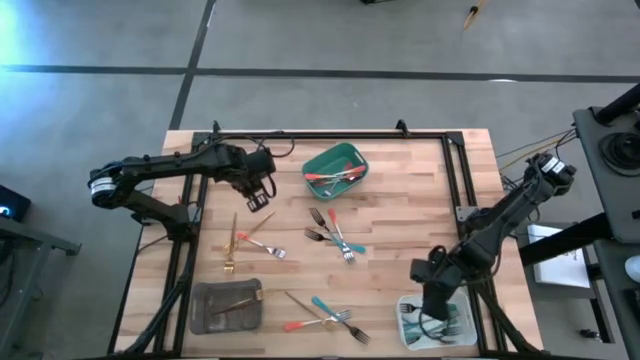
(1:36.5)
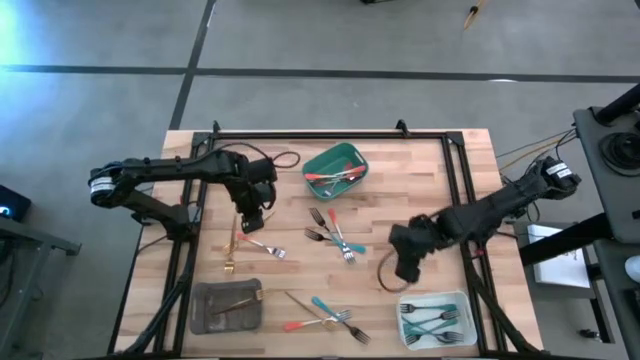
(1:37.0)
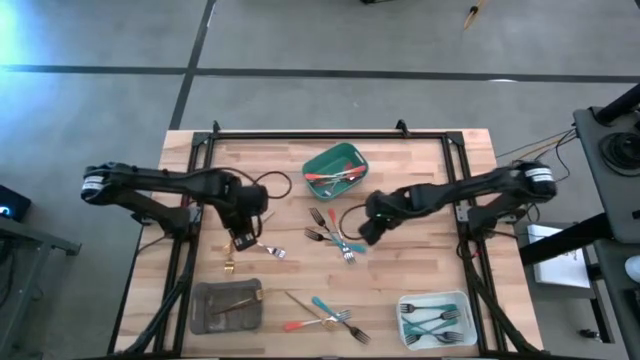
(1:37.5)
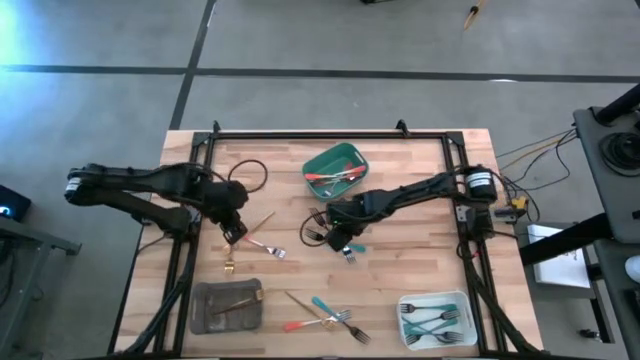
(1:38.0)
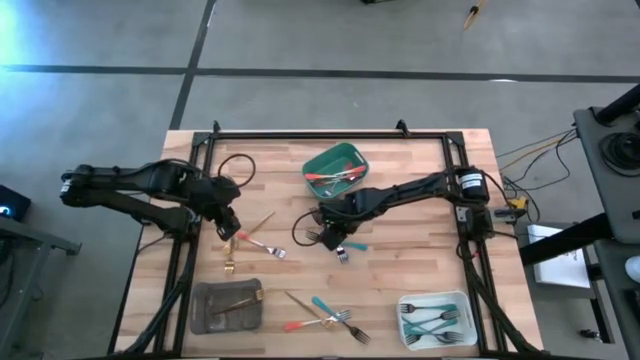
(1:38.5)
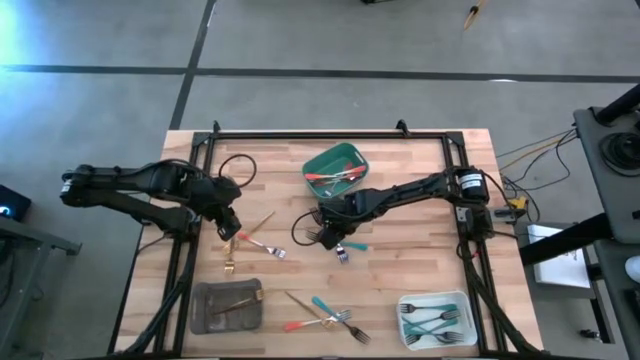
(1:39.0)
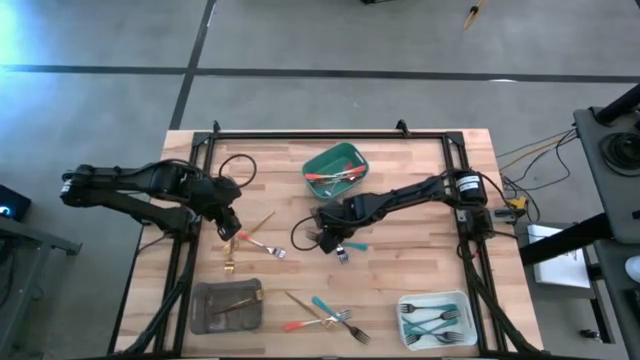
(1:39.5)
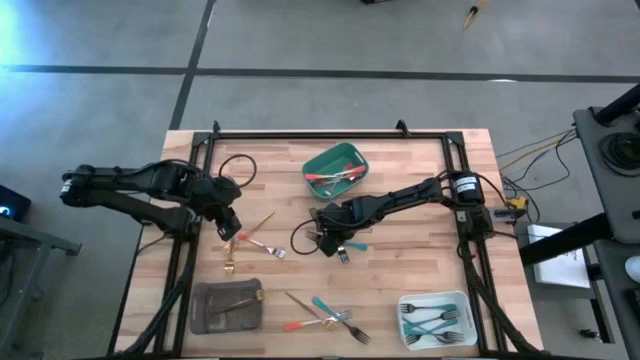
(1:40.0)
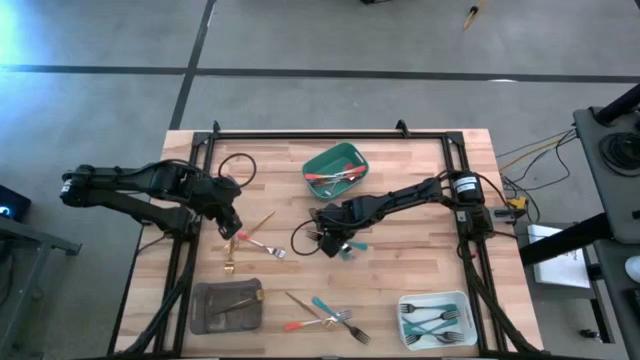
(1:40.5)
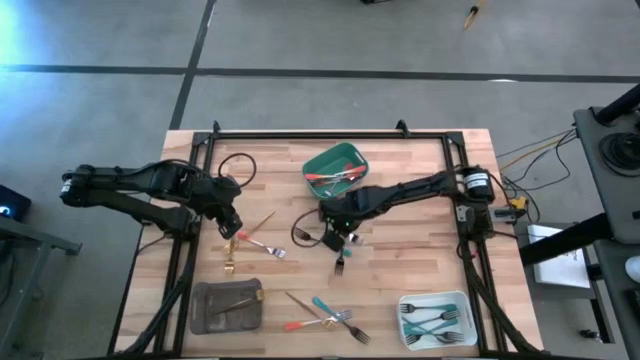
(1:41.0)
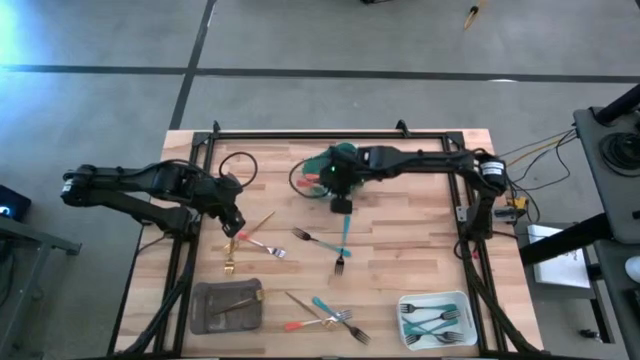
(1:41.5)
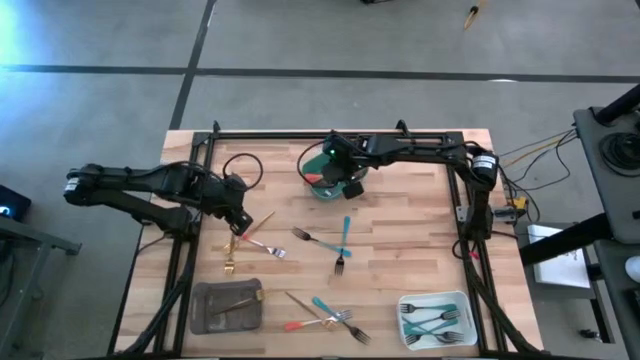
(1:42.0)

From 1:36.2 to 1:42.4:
Task: Sort silverware by color (type)
Put the orange fork into the green bin

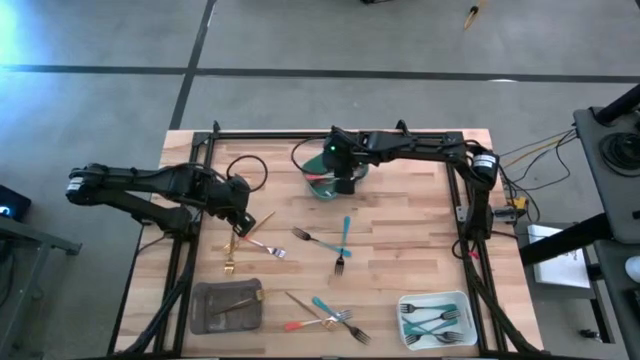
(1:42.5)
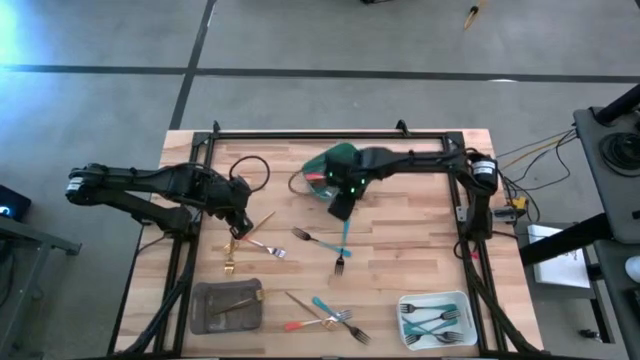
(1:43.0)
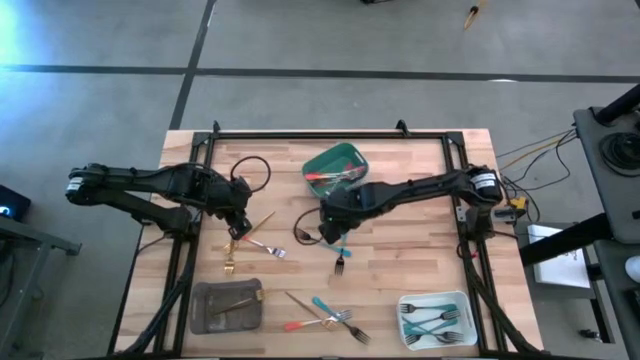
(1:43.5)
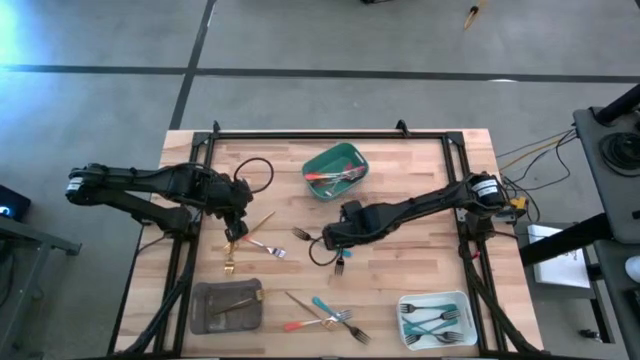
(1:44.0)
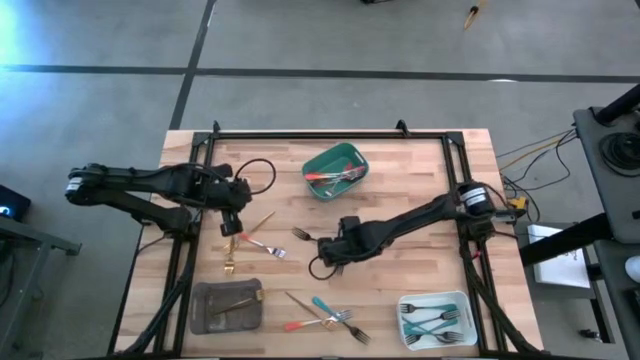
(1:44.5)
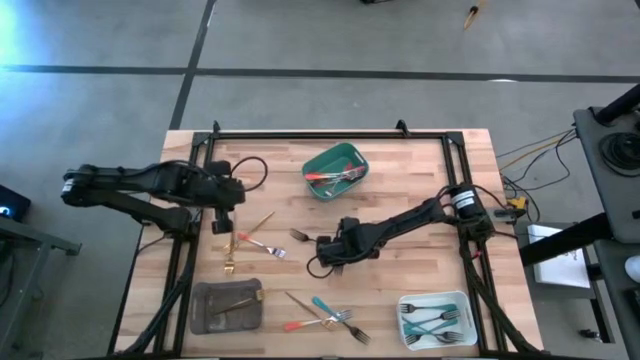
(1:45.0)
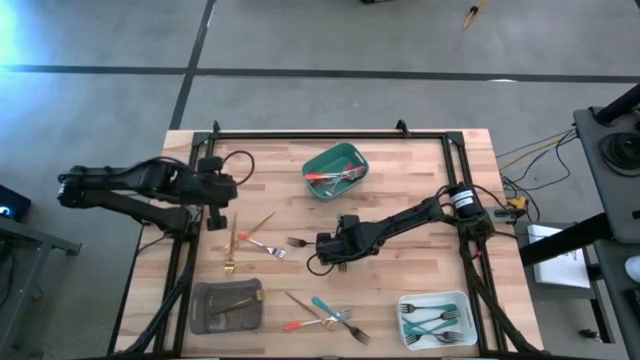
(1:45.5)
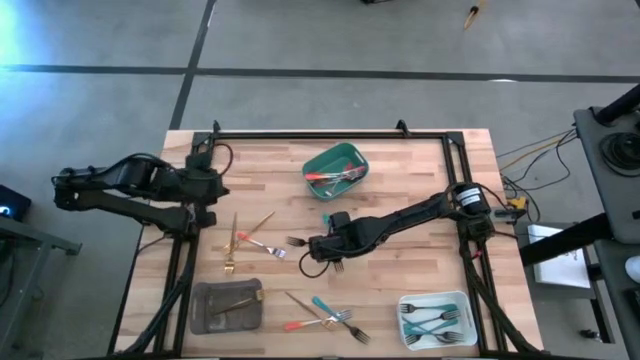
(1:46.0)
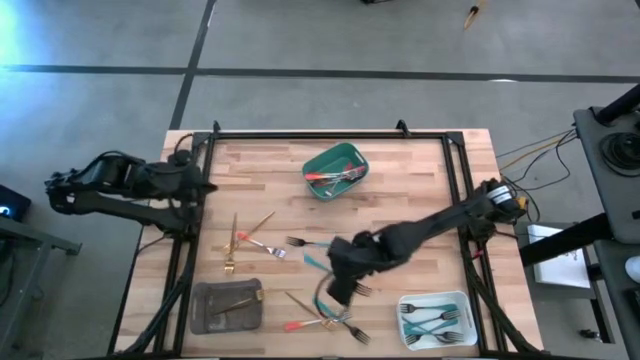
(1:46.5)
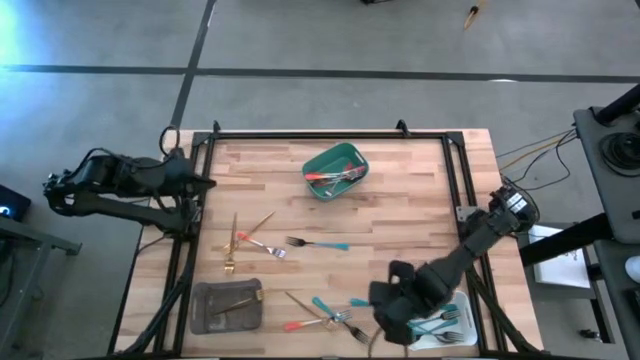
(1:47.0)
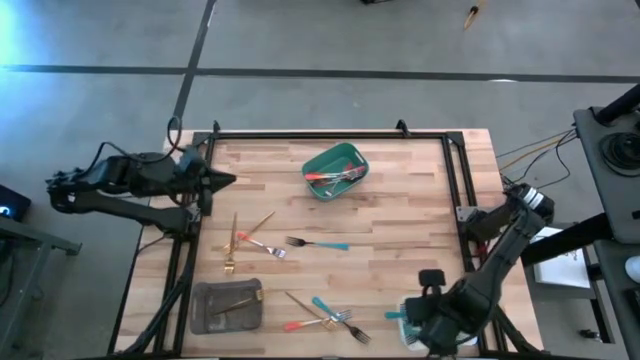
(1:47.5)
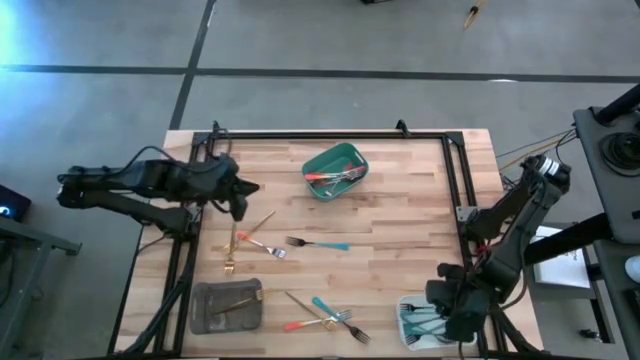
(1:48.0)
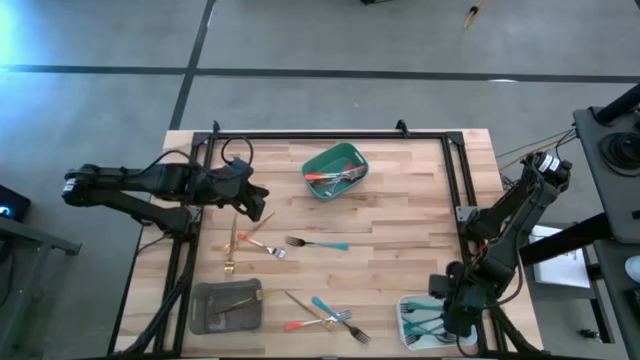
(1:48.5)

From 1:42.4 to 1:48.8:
Put the blue fork into the white bin

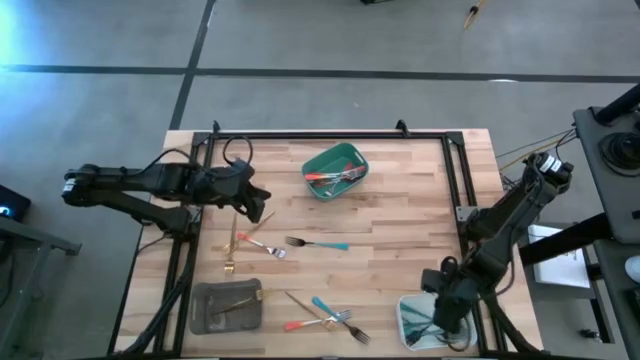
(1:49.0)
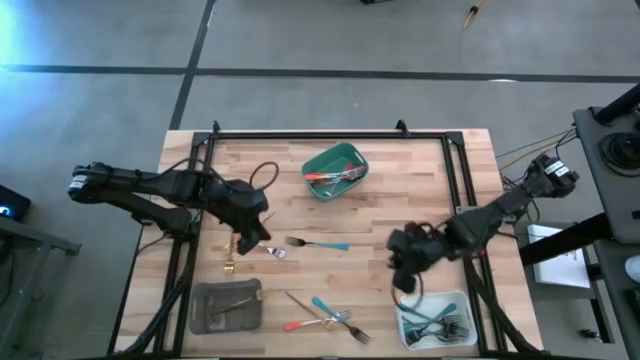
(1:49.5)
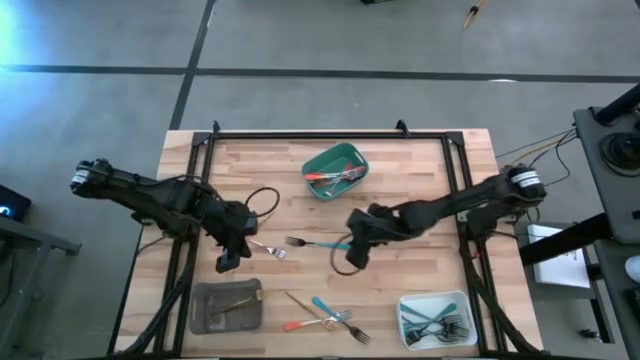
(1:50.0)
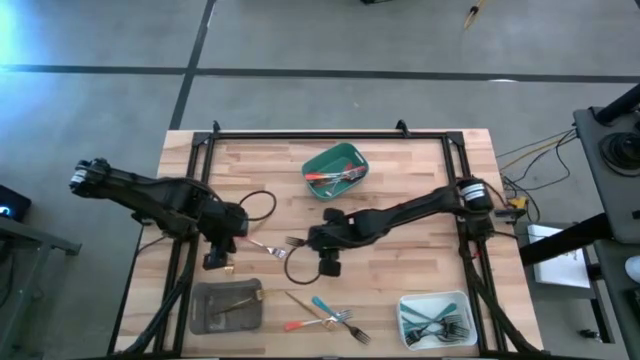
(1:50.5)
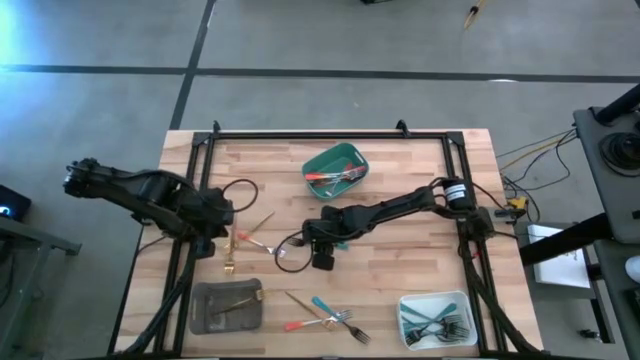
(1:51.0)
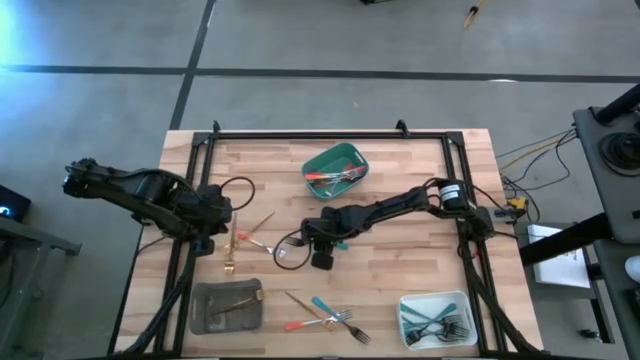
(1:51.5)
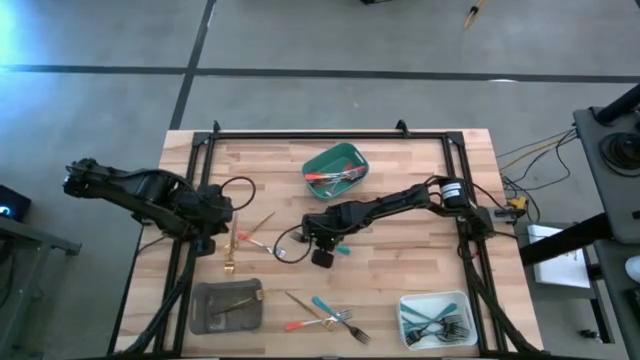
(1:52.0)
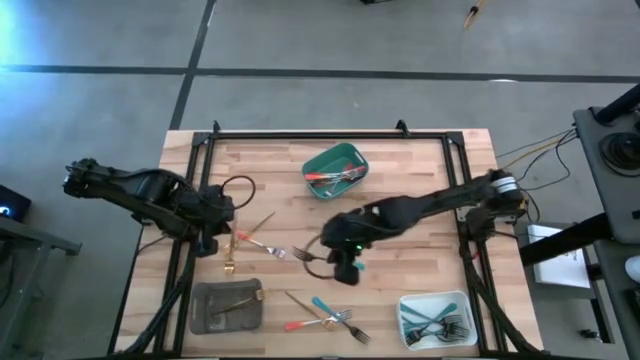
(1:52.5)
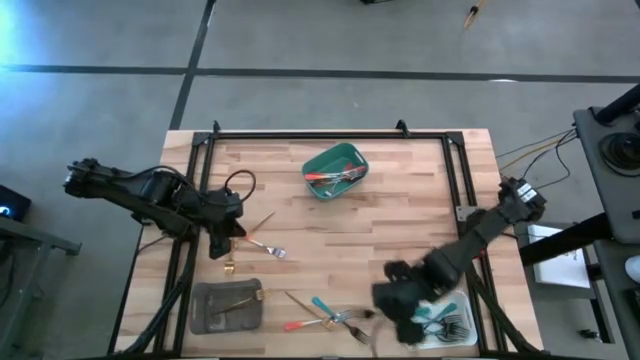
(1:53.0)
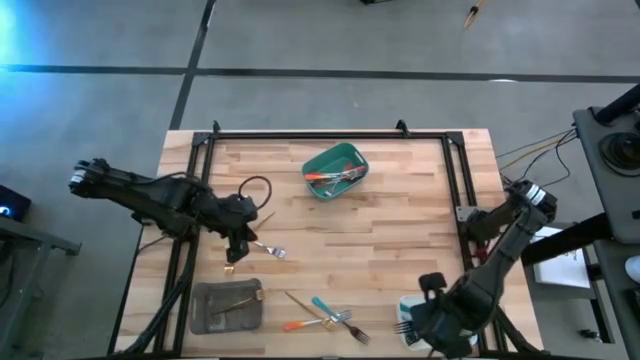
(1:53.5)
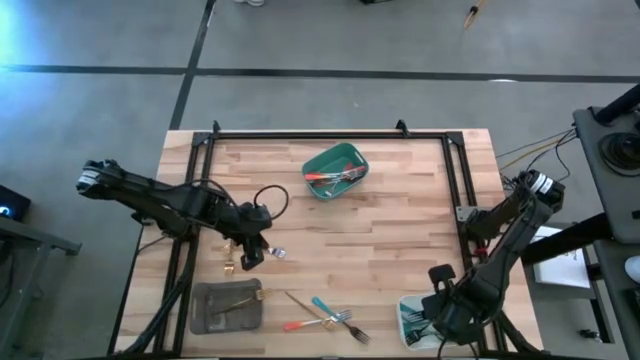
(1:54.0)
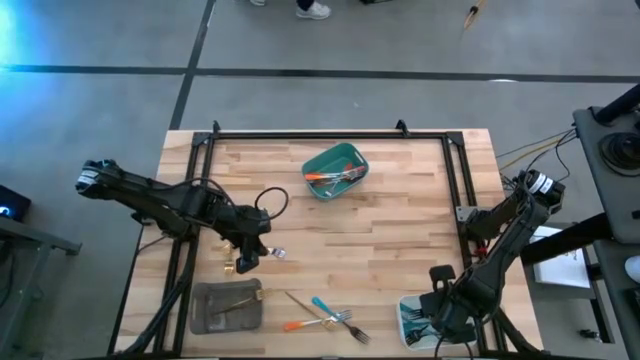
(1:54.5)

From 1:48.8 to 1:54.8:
Put the blue fork into the white bin

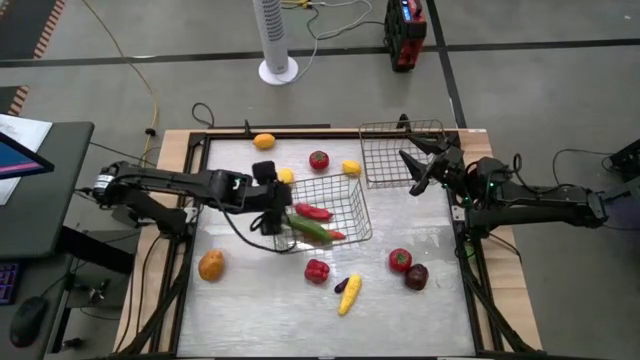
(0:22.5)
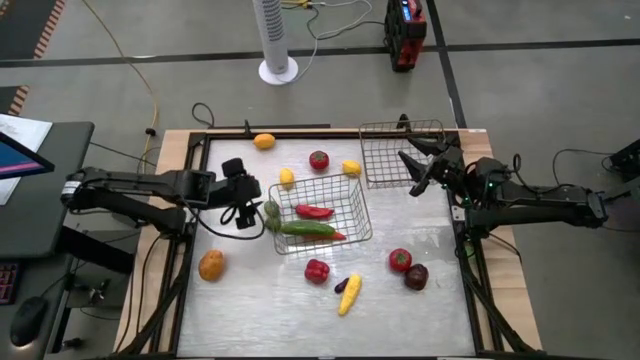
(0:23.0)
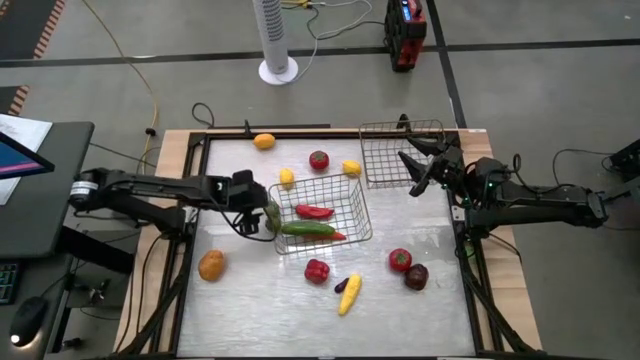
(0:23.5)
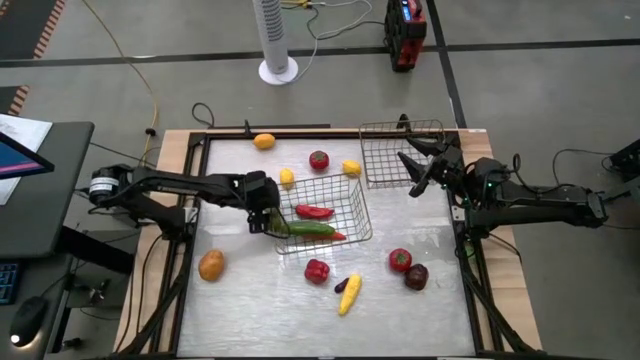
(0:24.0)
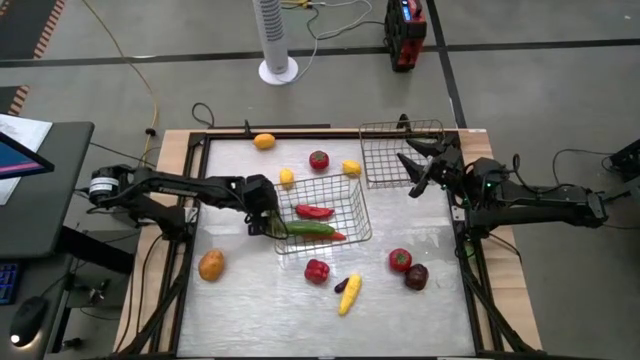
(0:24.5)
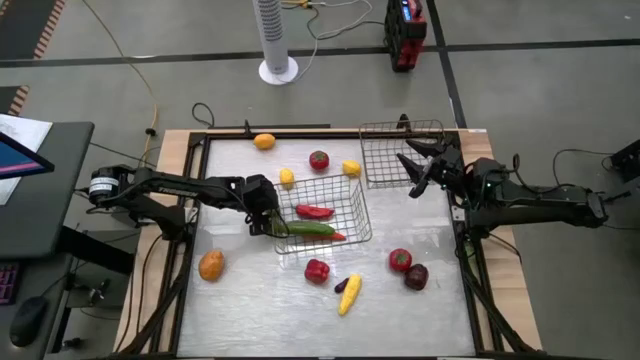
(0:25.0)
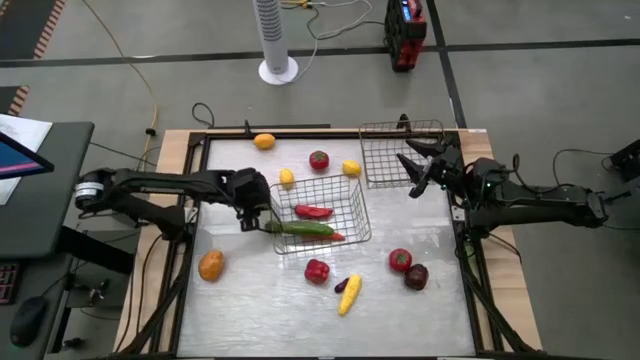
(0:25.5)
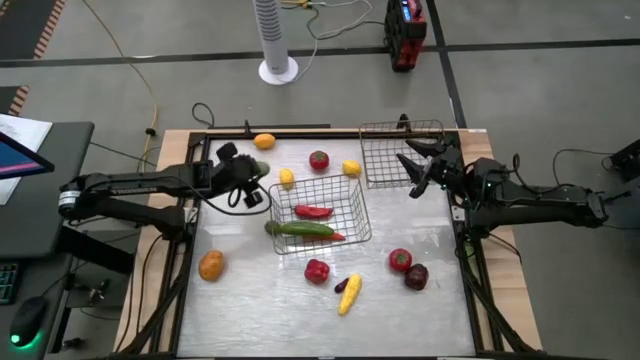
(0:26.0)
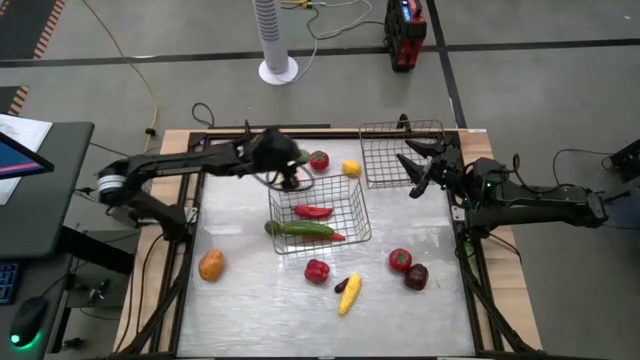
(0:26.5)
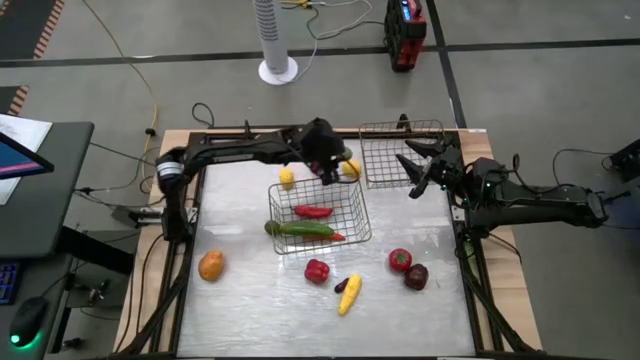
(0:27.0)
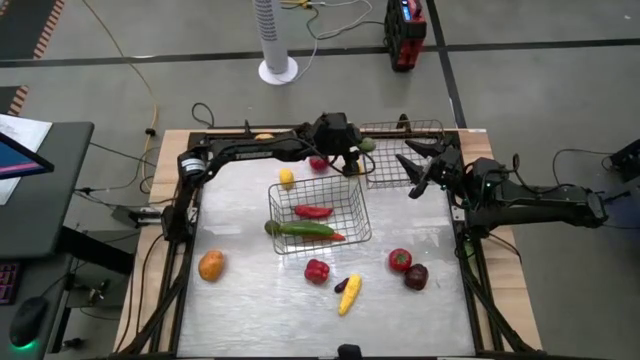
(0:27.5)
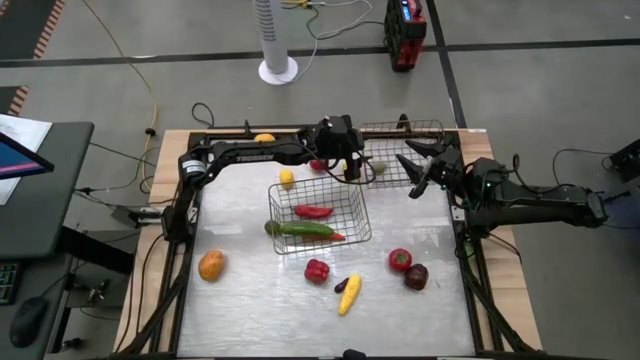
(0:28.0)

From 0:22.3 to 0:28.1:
Task: Sort produce into baskets
Put the green lime into the right wire basket
